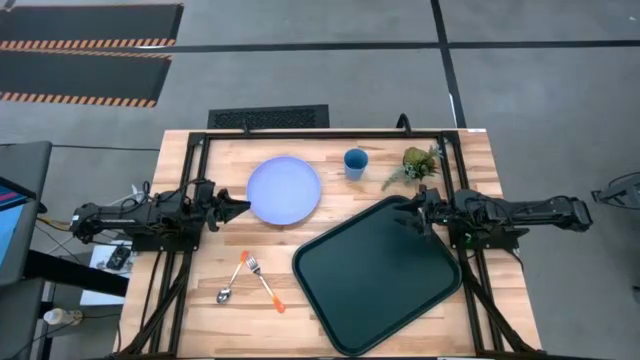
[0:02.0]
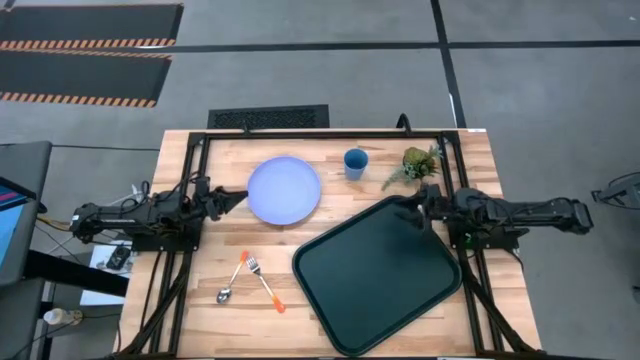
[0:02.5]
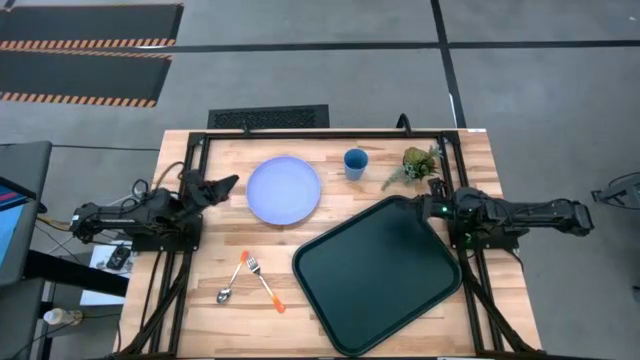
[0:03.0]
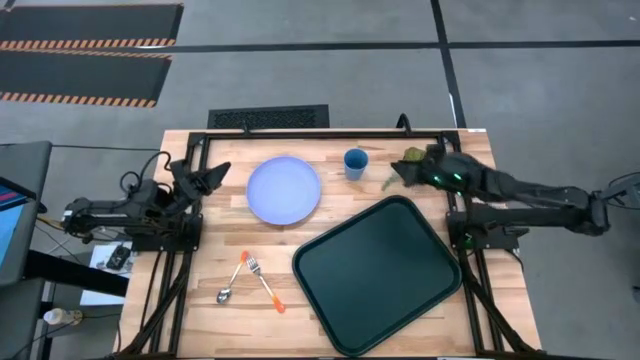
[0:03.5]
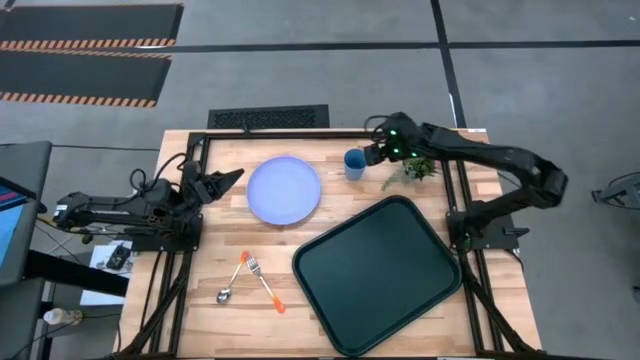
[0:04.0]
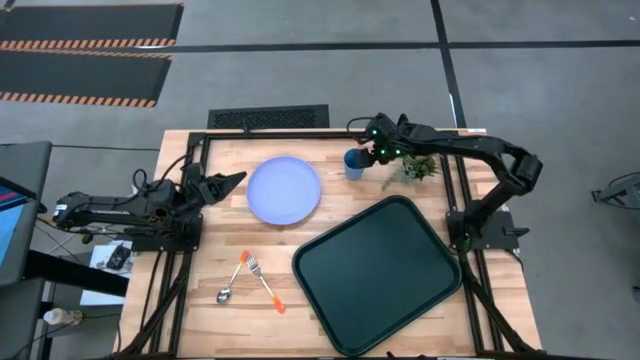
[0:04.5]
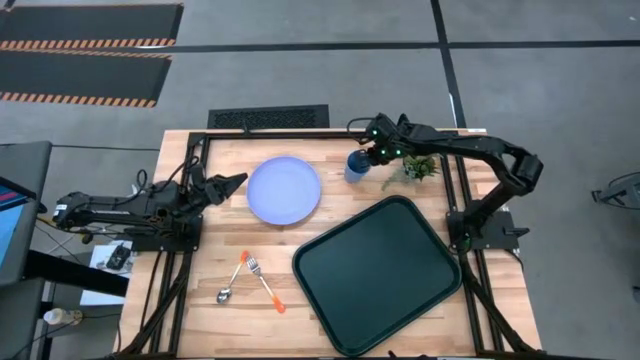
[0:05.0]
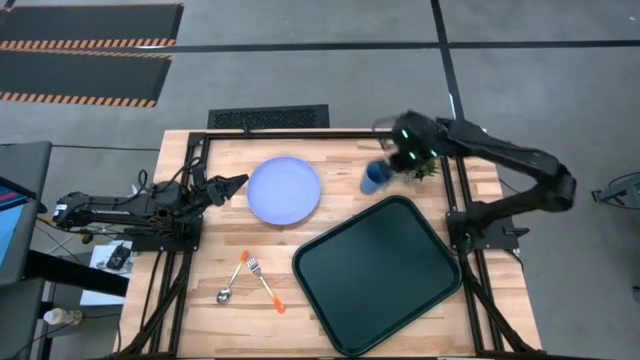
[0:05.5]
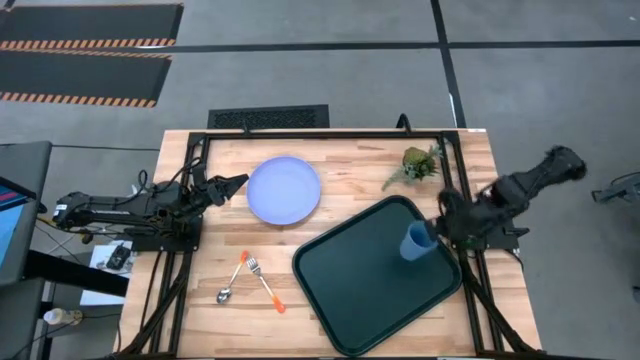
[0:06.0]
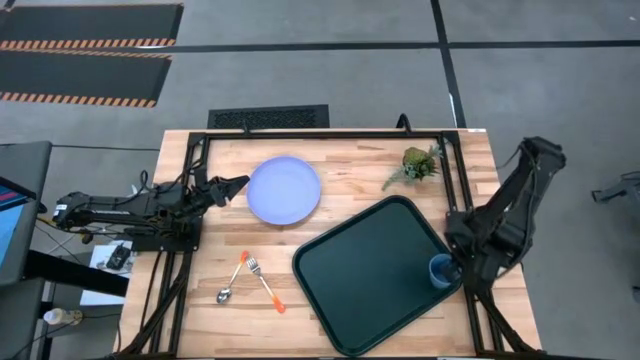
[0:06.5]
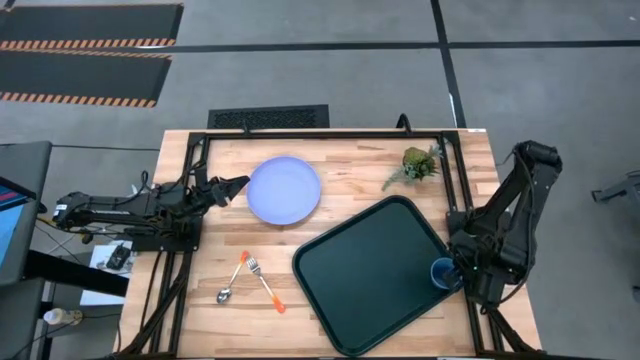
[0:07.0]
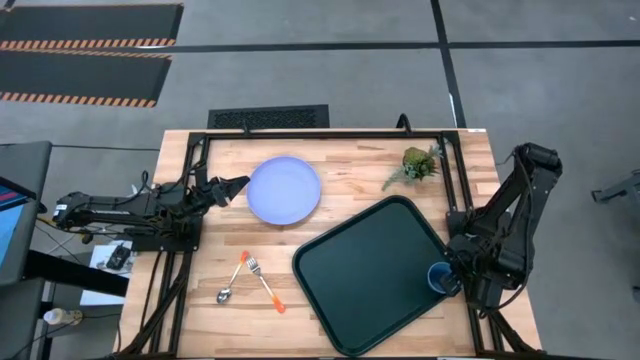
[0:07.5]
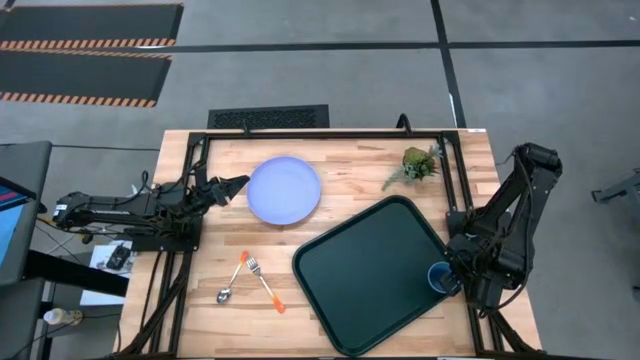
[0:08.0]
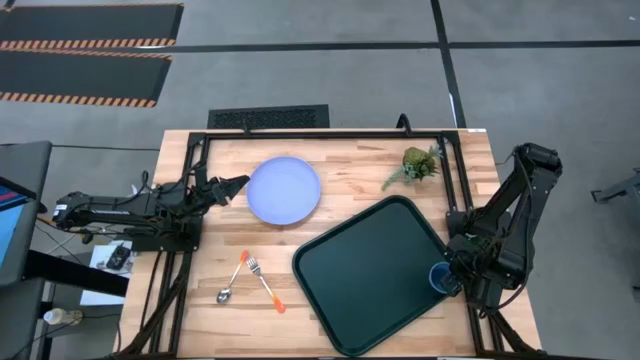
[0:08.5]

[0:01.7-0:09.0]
Task: Pick and place plate/cup/fork/spoon on tray
Put the blue cup on the green serving tray

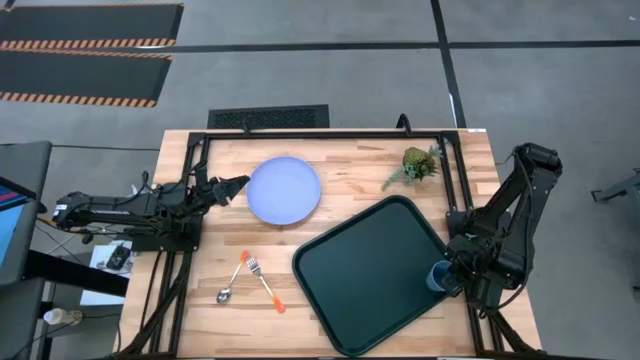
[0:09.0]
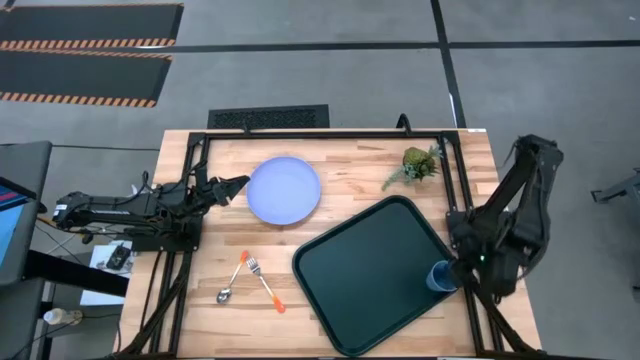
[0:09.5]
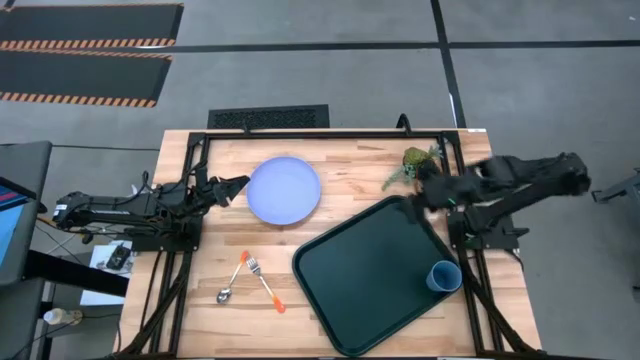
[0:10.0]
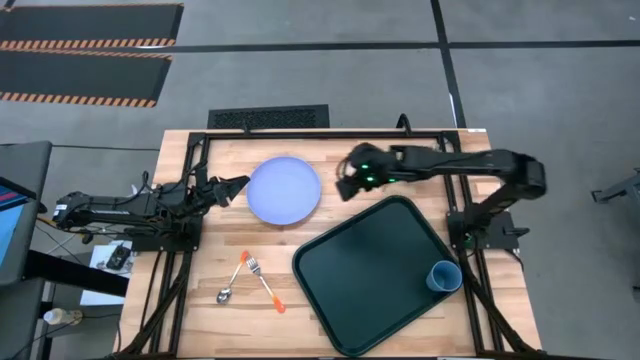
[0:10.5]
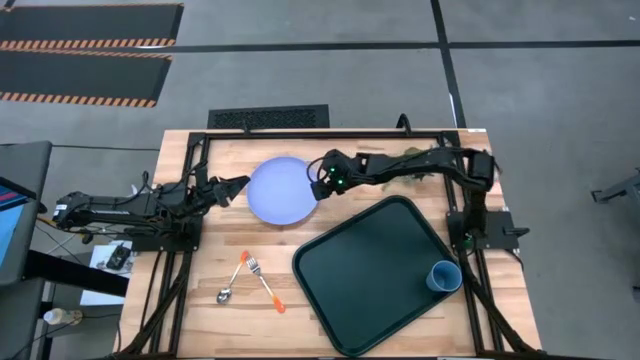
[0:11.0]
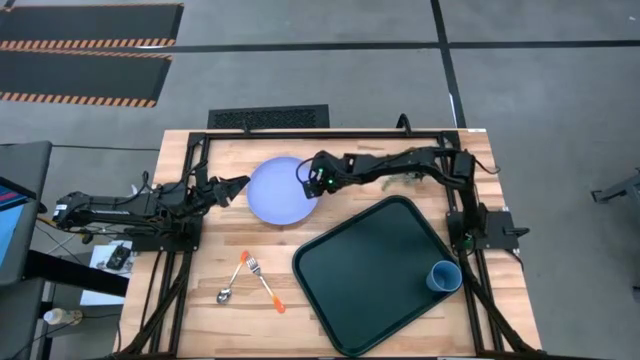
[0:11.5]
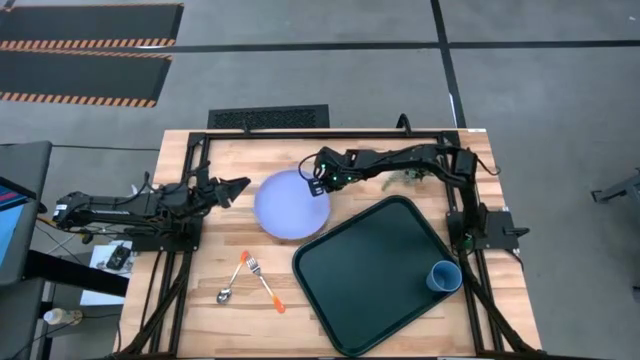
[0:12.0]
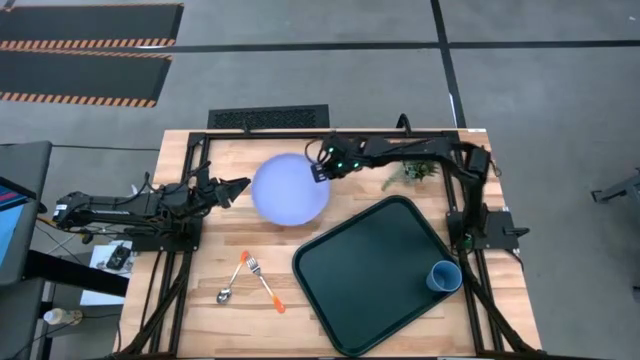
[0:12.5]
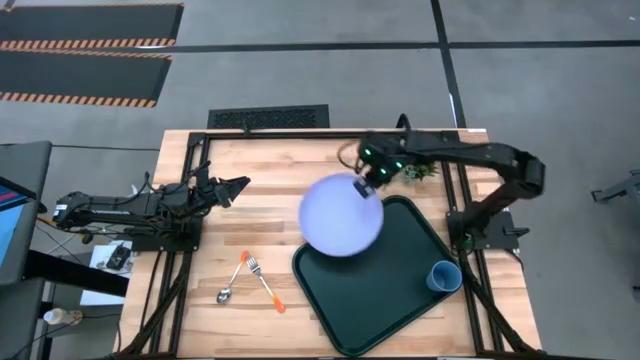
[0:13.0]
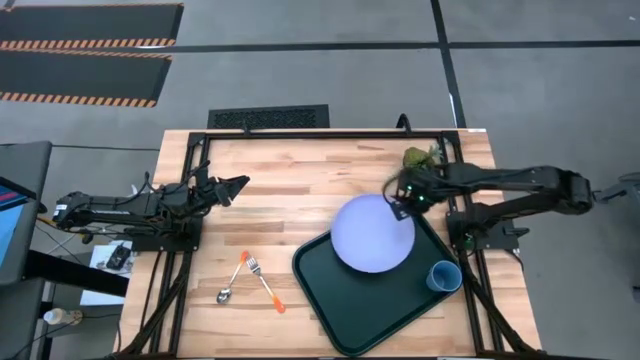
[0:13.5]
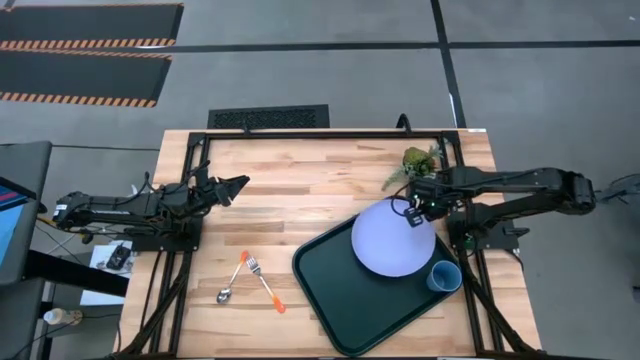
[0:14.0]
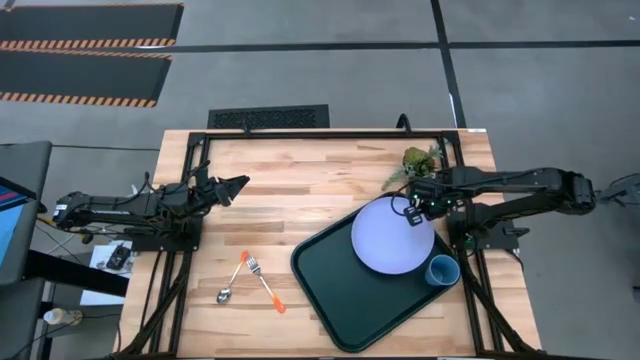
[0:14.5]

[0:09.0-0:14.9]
Put the purple plate under the blue cup on the green serving tray

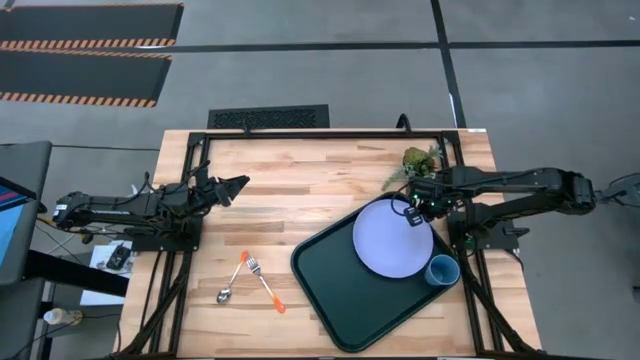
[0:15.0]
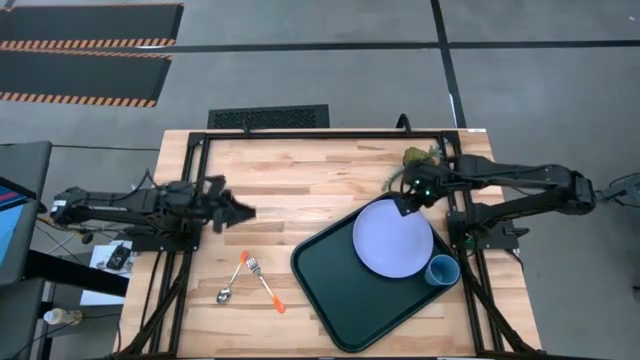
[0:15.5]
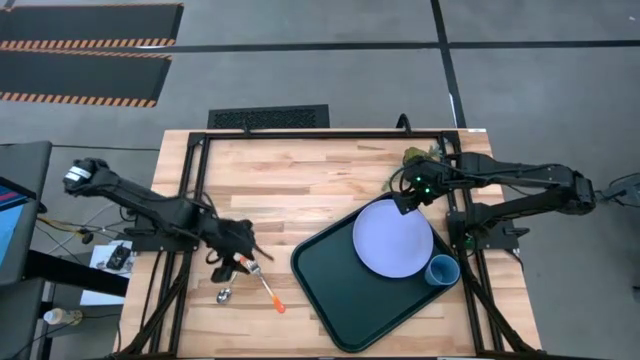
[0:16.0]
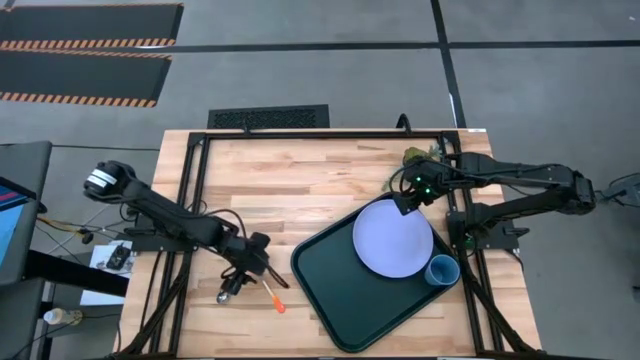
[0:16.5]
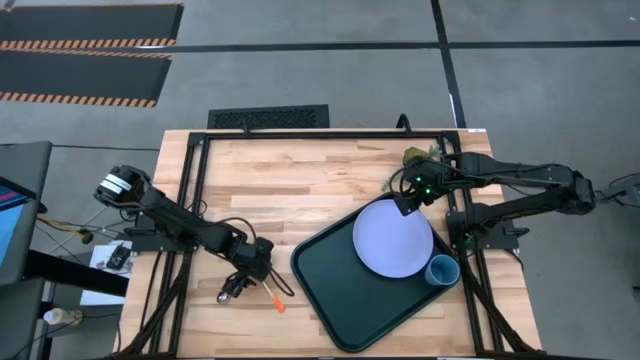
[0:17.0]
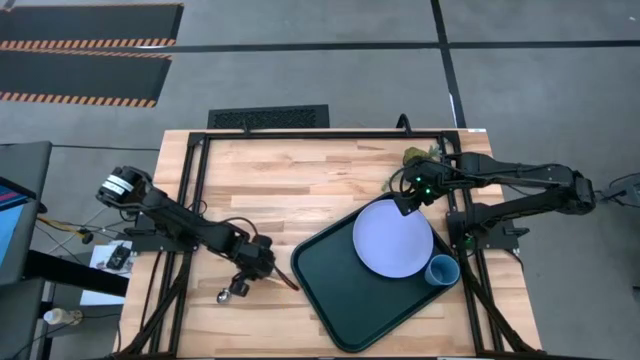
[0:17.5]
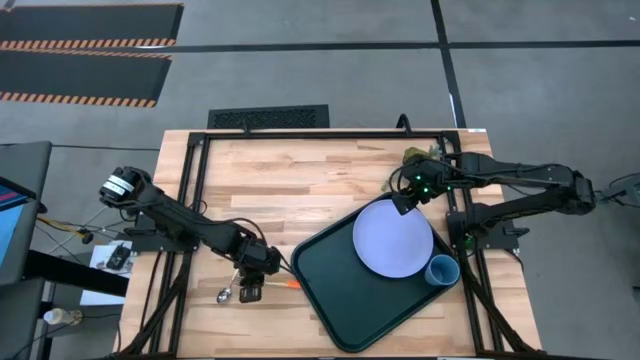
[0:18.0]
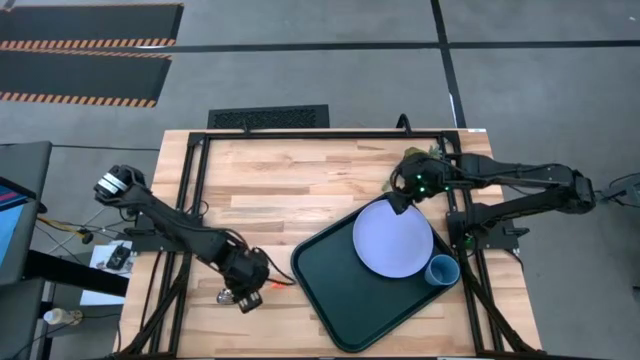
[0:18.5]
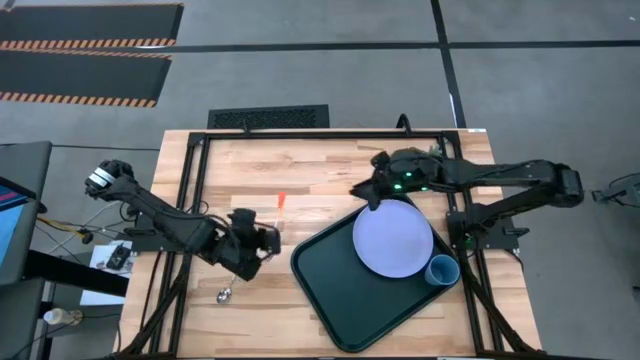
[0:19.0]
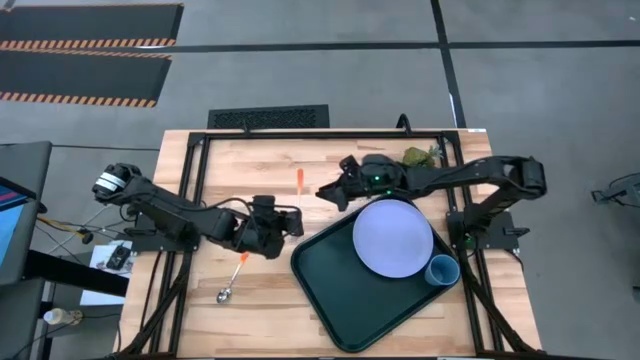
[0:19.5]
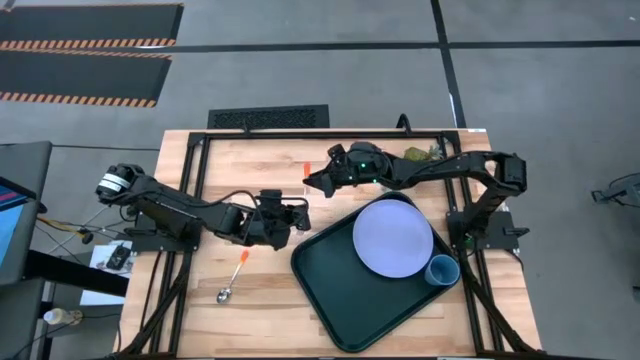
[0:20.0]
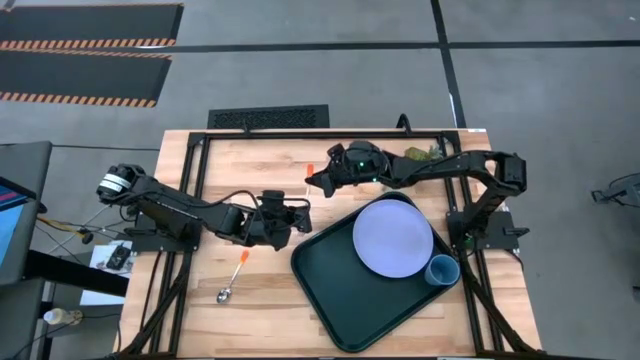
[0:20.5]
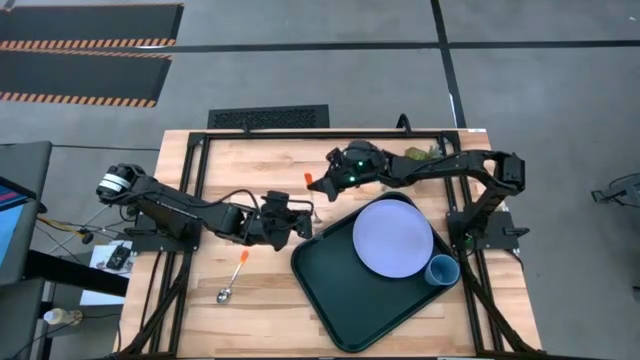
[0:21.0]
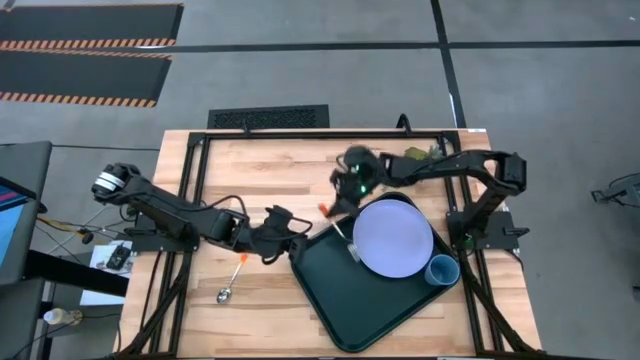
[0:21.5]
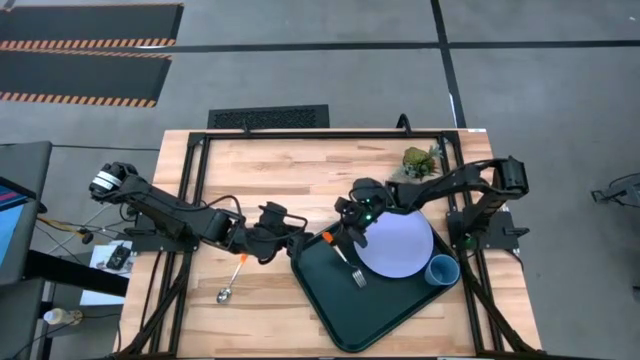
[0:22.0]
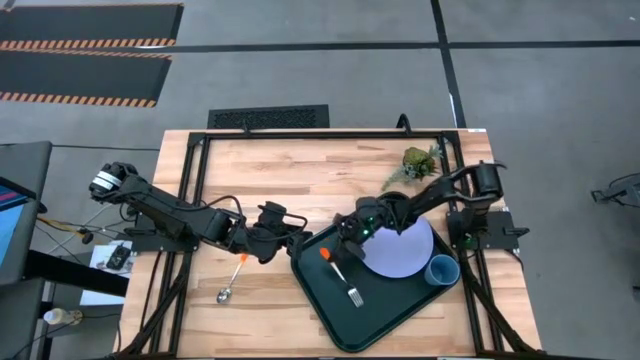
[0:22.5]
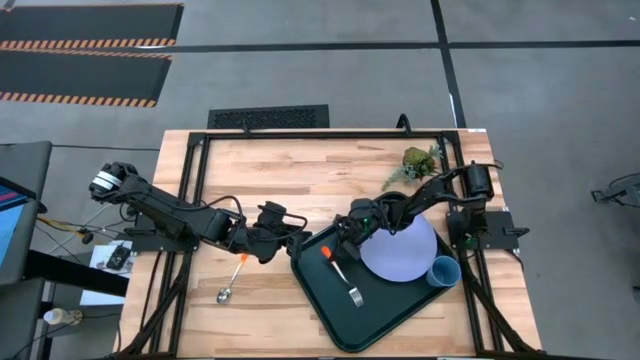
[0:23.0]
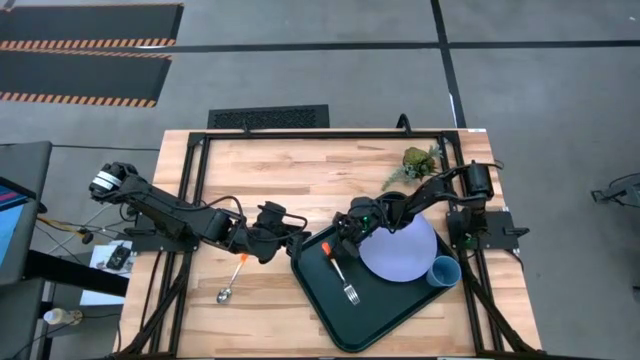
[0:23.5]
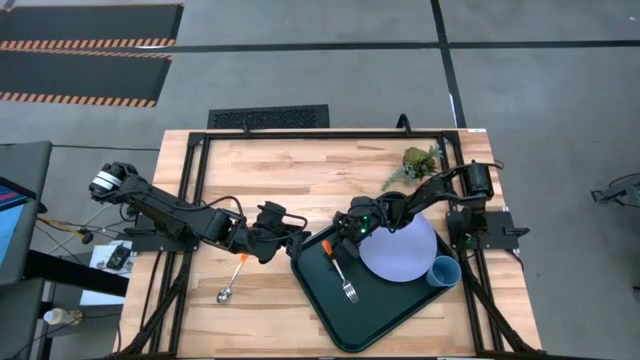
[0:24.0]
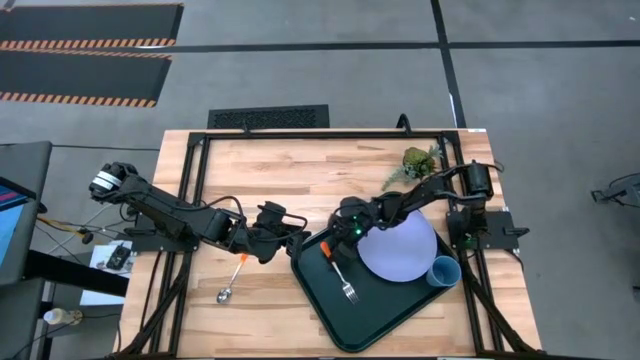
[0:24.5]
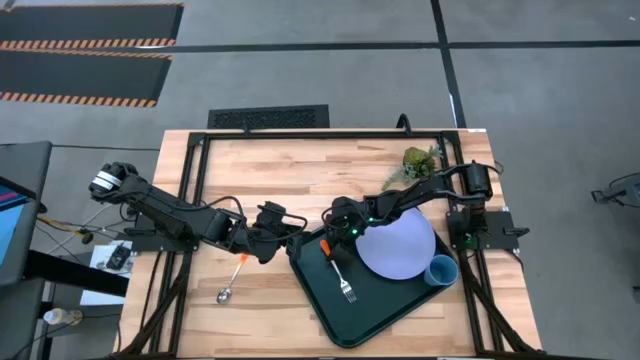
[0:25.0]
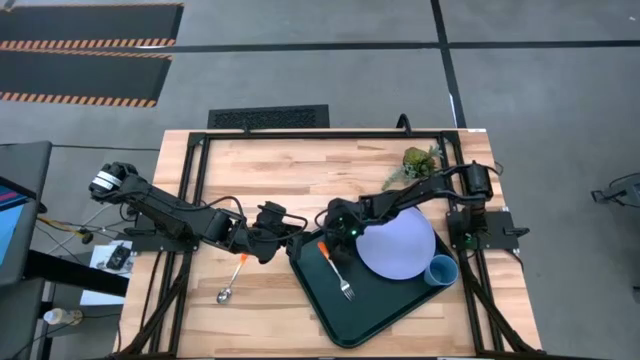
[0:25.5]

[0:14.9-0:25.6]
Put the orange fork to the right of the purple plate on the green serving tray
